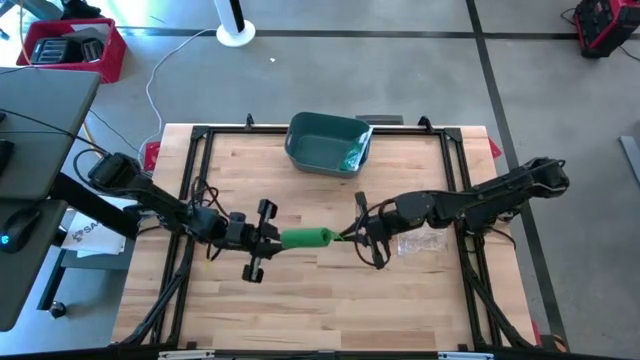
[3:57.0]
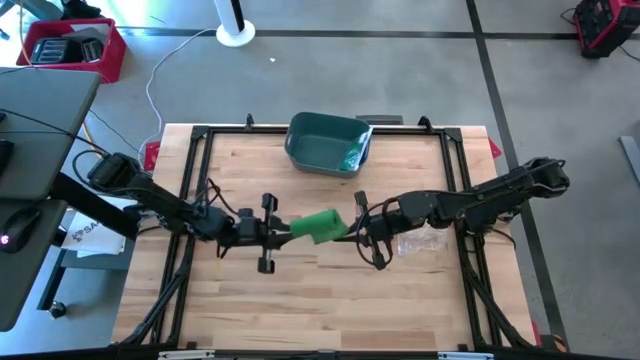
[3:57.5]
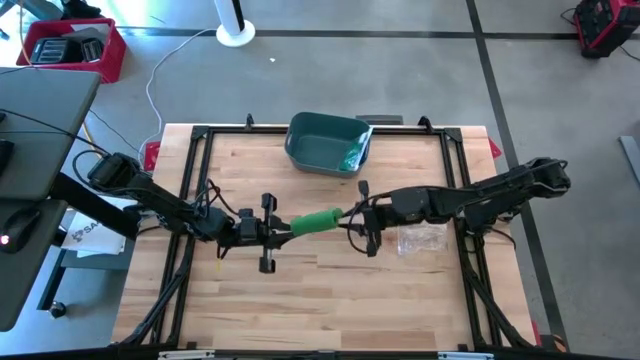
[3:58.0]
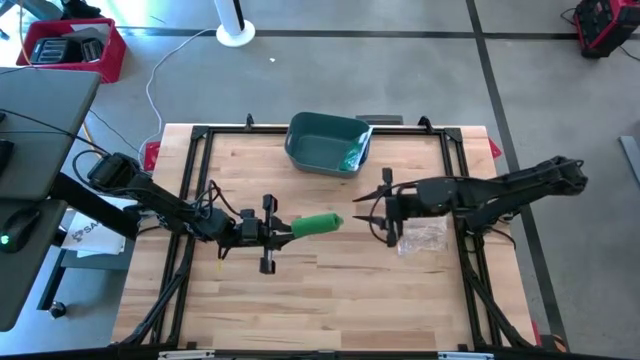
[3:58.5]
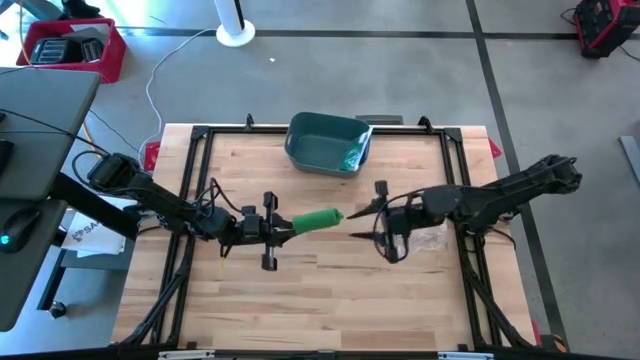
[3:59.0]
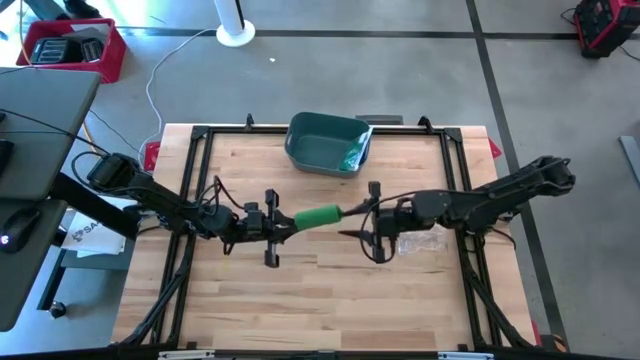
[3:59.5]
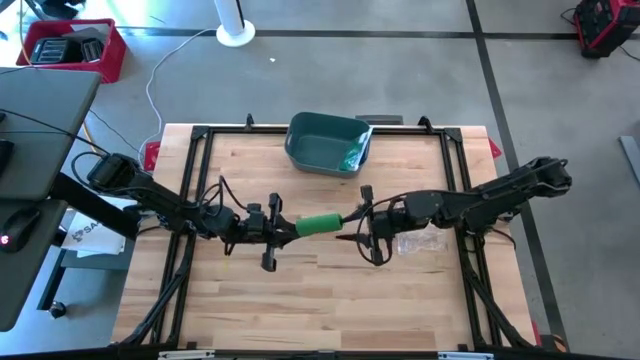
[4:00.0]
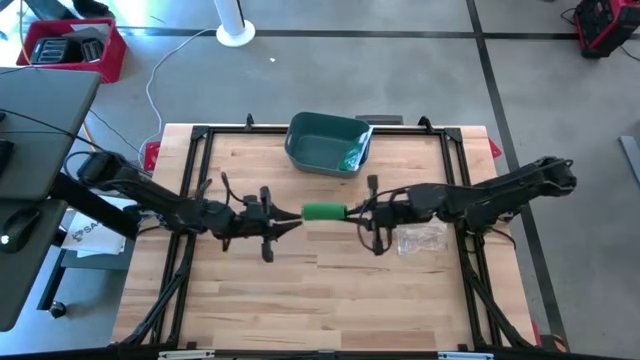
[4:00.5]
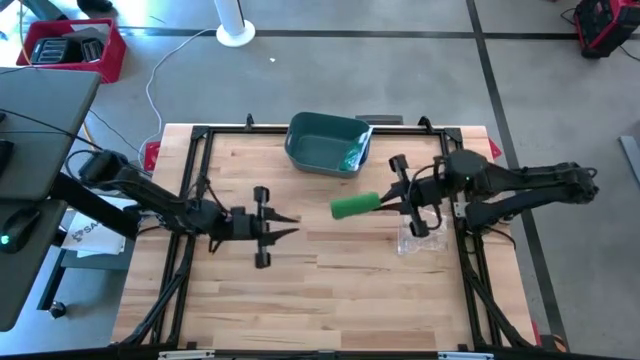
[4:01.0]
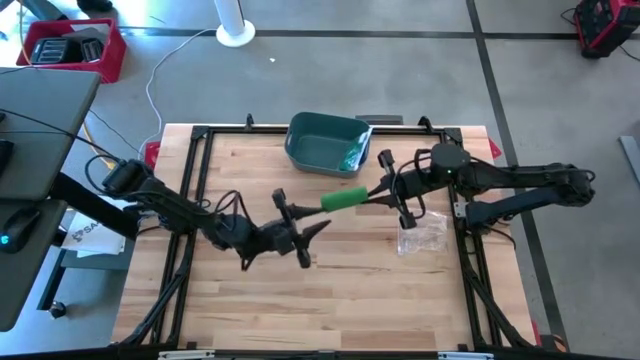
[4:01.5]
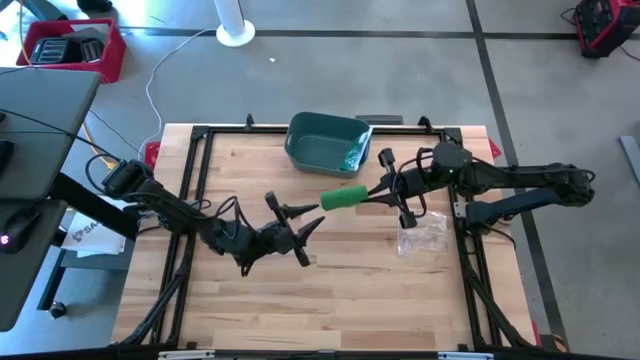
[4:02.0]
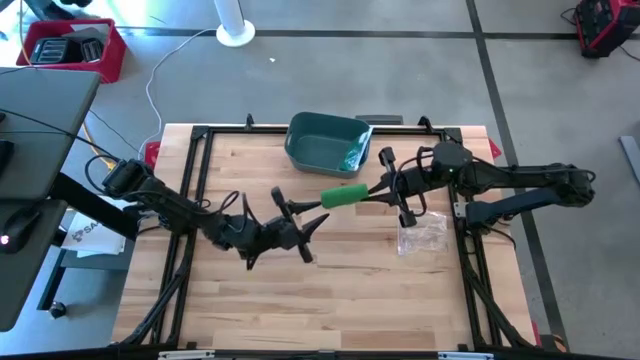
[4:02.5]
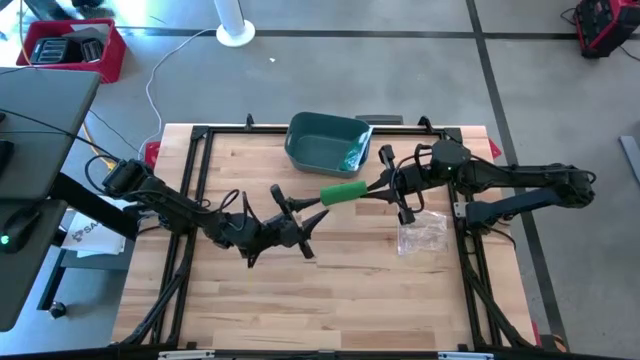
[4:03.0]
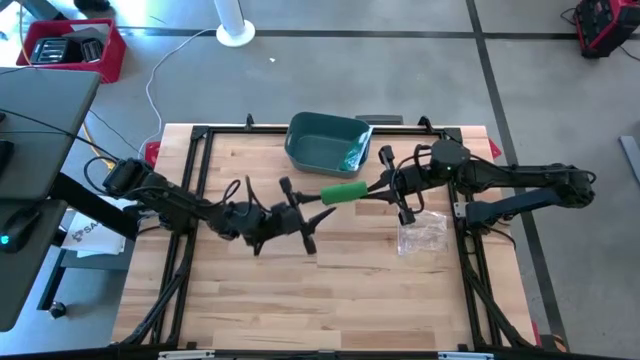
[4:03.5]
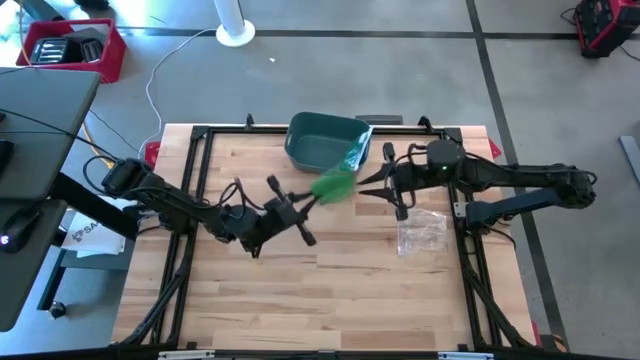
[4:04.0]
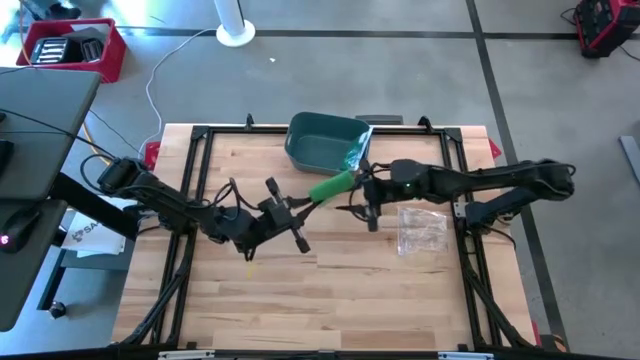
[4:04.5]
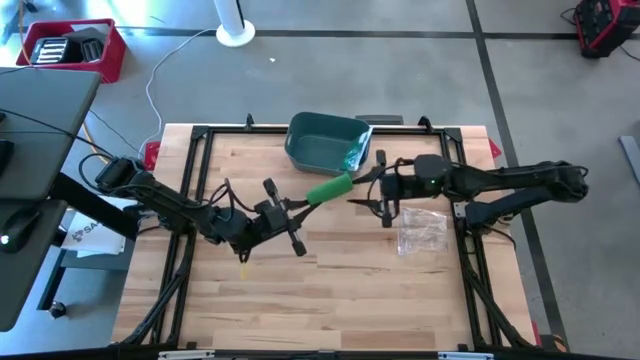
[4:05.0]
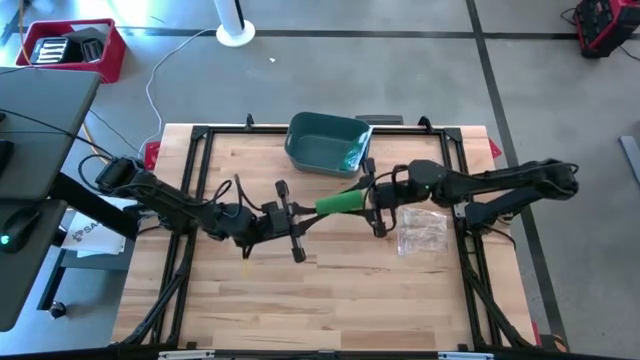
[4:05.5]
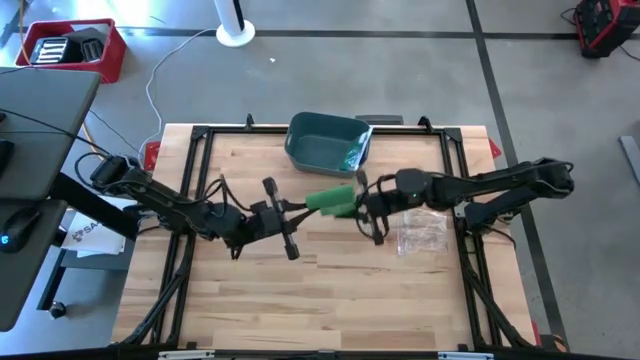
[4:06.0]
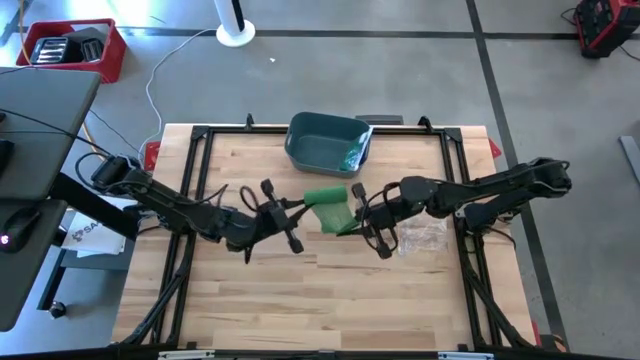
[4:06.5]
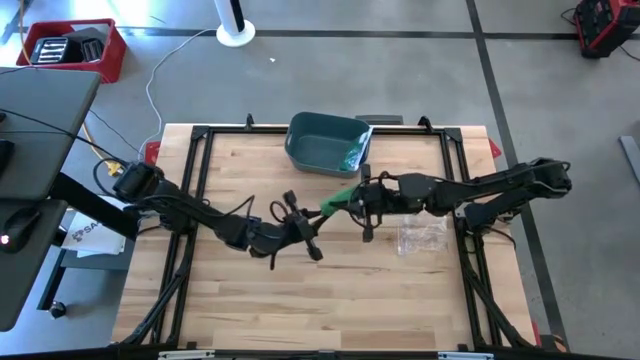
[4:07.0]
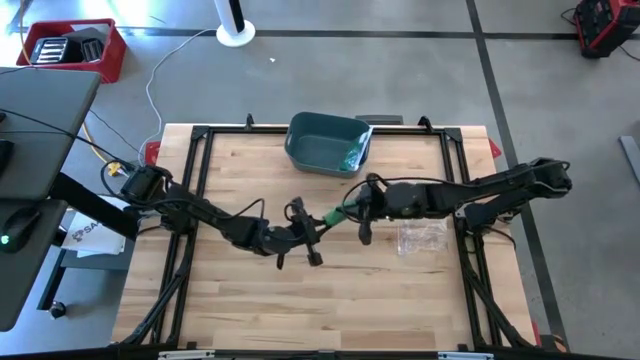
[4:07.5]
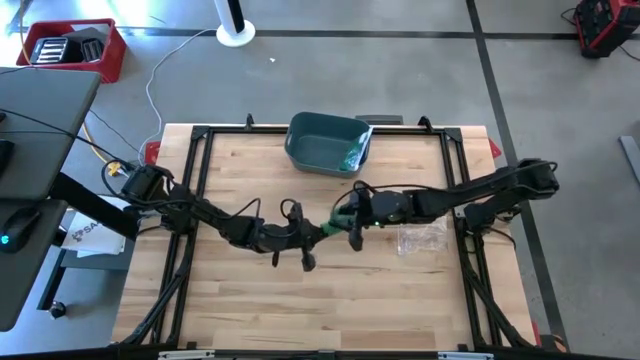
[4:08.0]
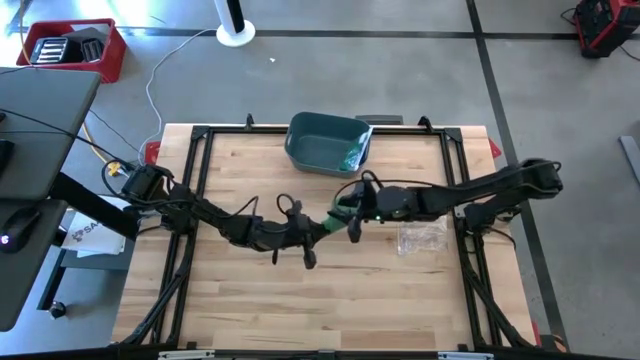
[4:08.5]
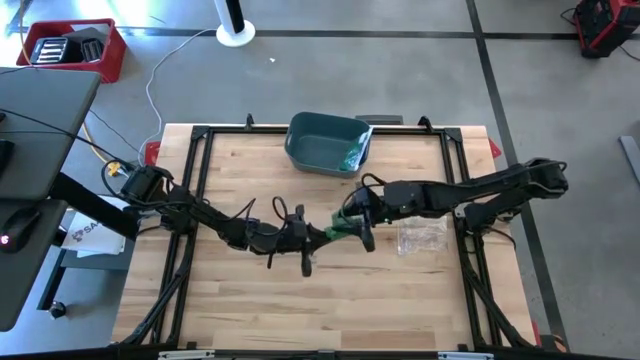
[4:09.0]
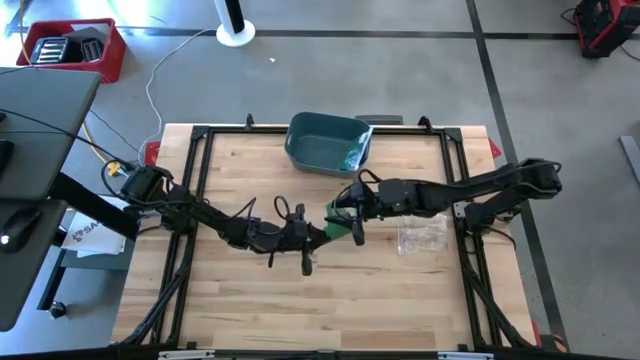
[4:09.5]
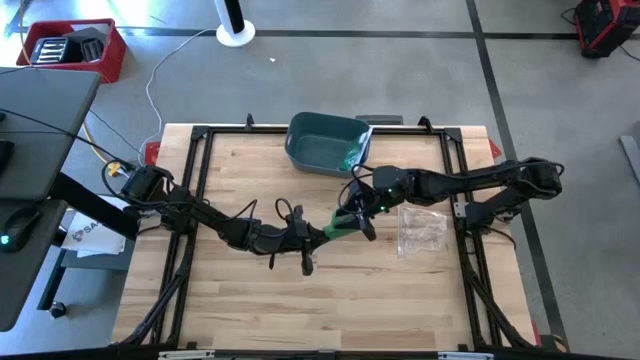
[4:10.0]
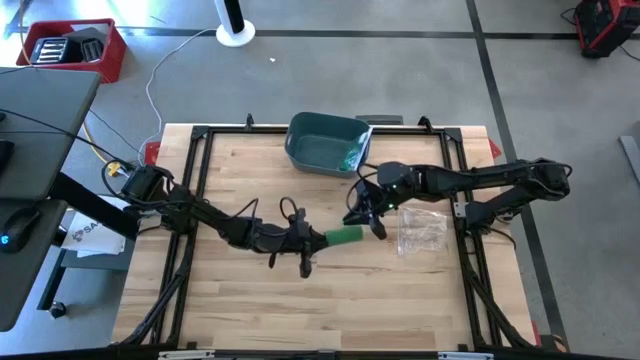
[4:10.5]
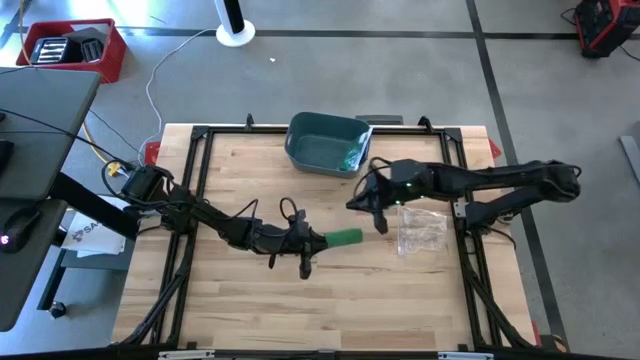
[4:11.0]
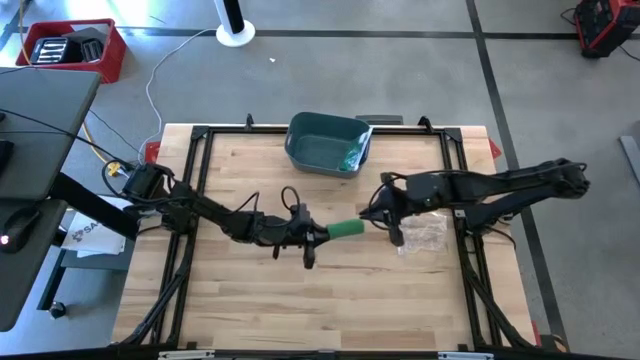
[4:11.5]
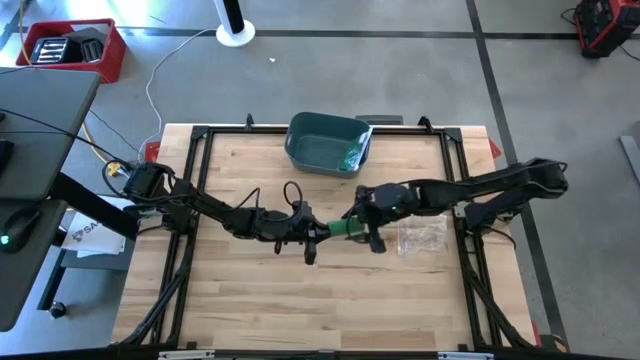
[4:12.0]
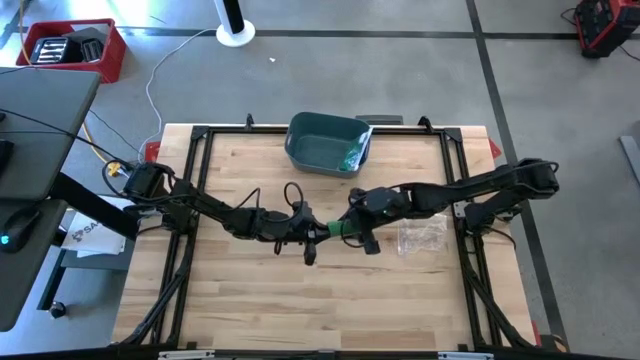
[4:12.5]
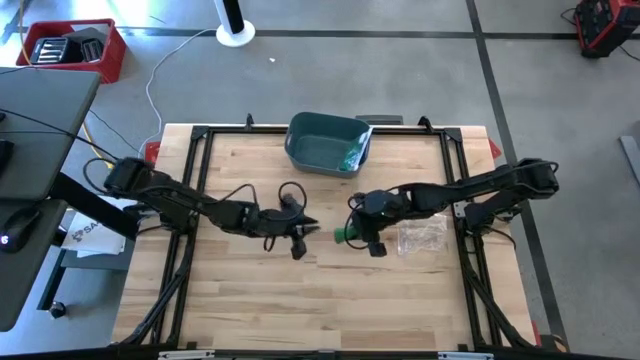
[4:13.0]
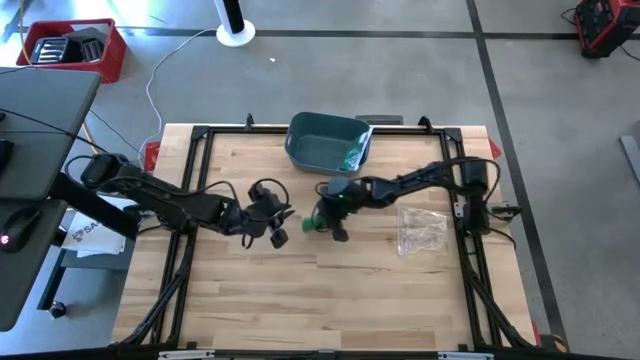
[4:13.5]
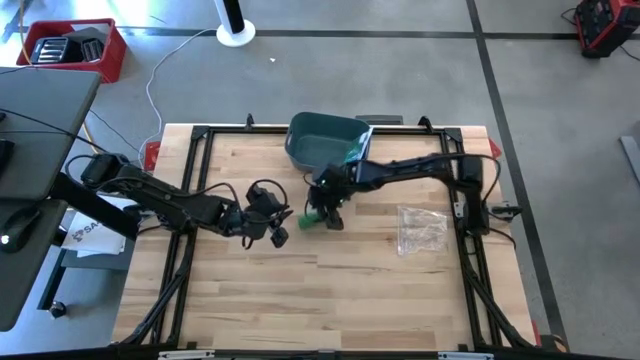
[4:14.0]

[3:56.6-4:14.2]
Task: Roll bandage
Roll the green bandage
